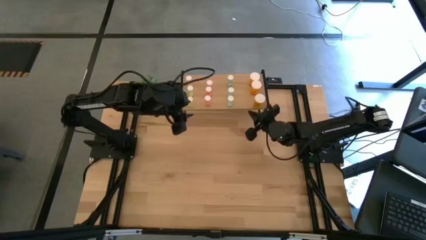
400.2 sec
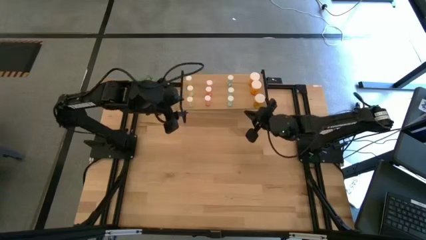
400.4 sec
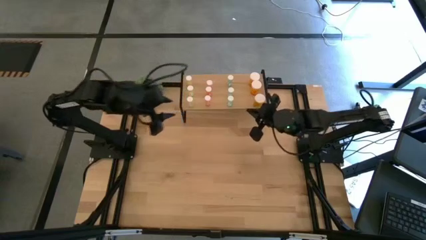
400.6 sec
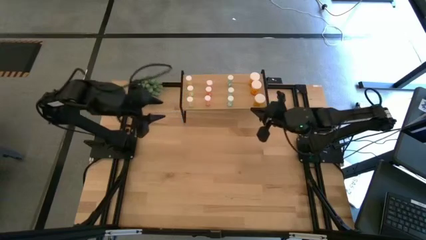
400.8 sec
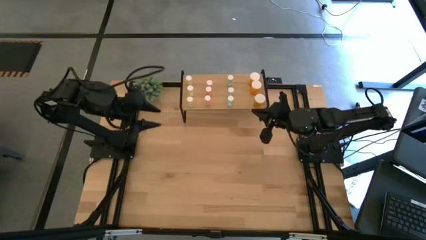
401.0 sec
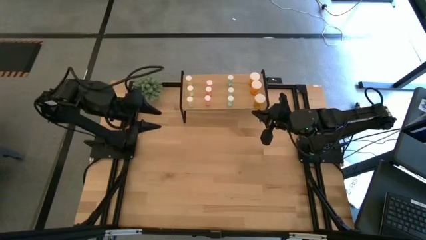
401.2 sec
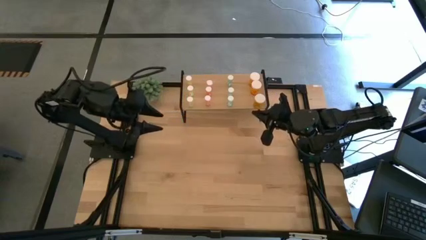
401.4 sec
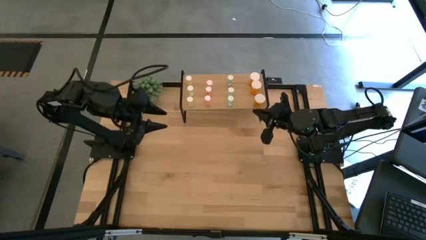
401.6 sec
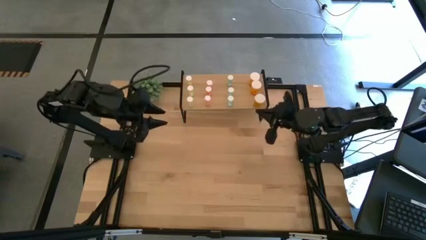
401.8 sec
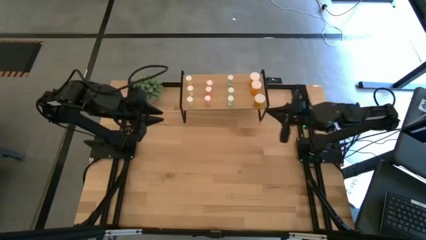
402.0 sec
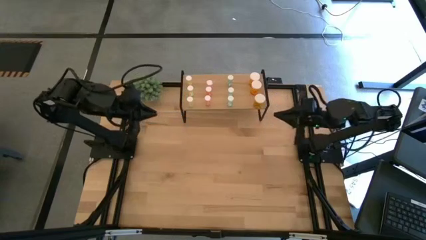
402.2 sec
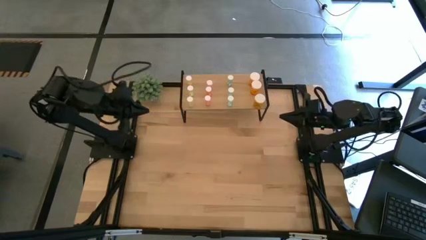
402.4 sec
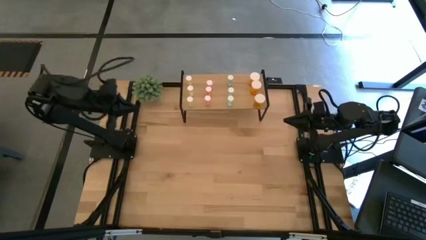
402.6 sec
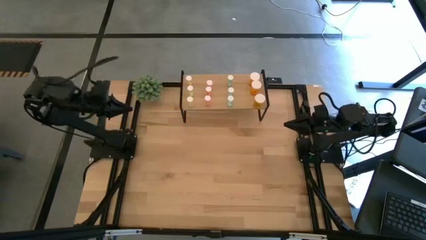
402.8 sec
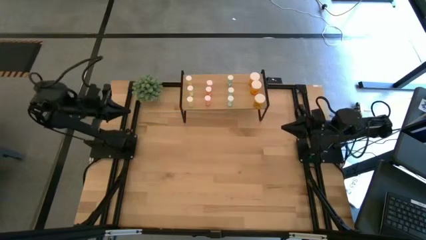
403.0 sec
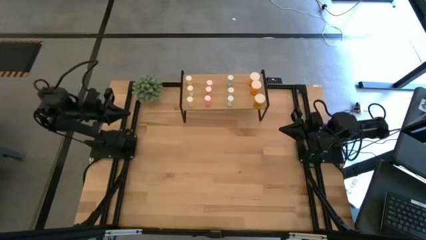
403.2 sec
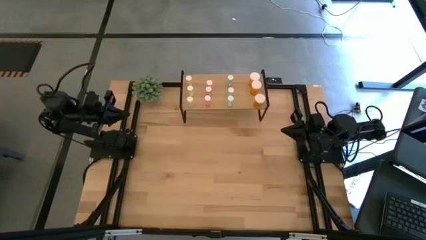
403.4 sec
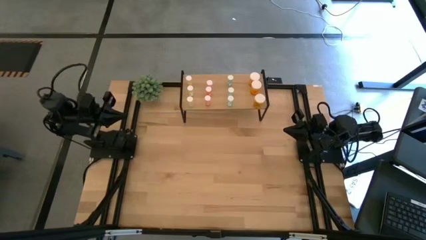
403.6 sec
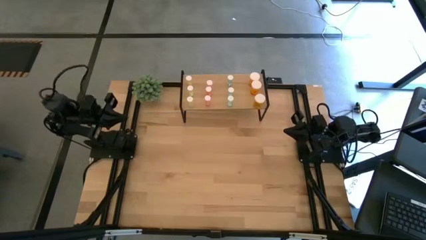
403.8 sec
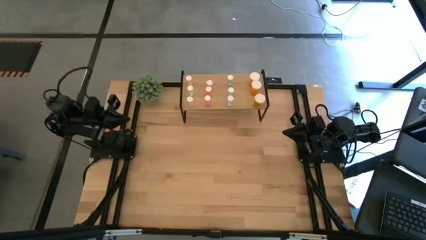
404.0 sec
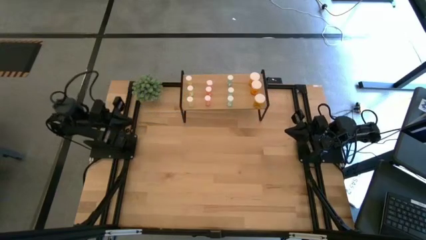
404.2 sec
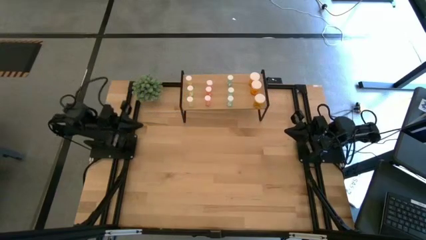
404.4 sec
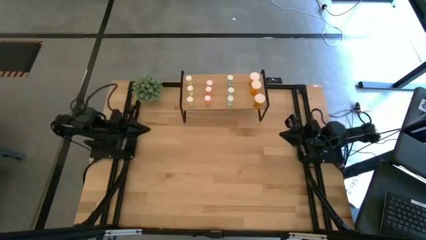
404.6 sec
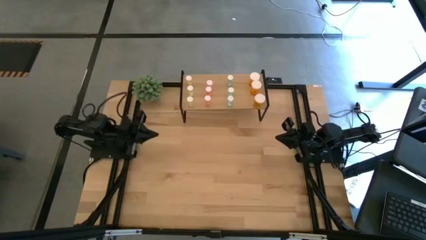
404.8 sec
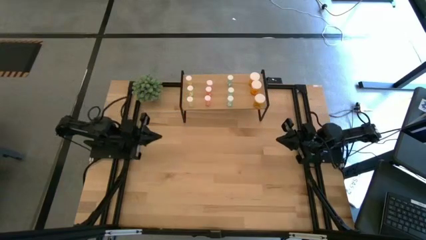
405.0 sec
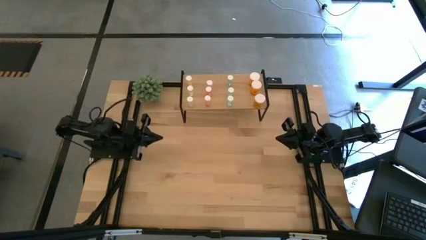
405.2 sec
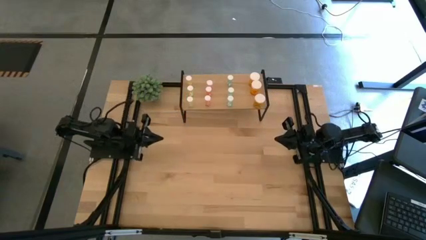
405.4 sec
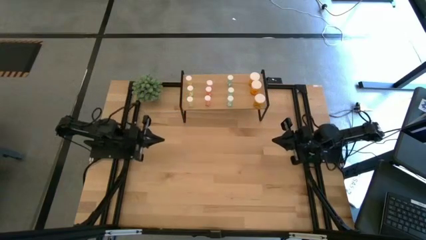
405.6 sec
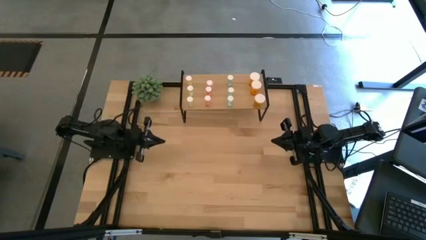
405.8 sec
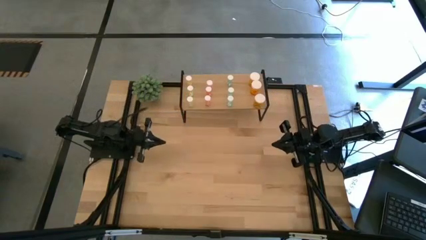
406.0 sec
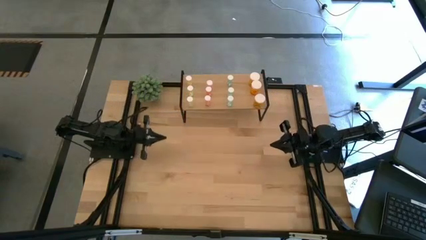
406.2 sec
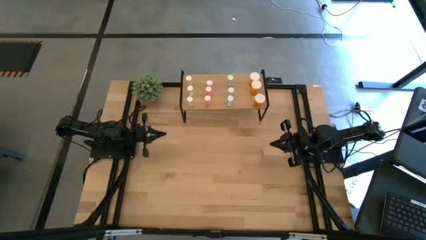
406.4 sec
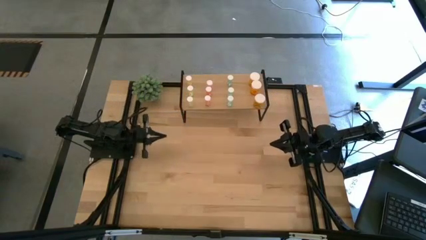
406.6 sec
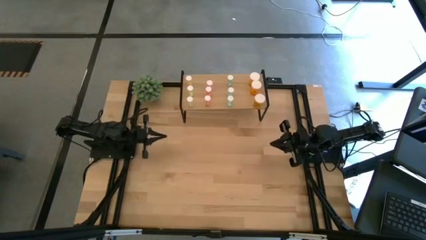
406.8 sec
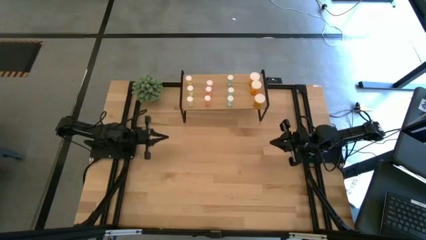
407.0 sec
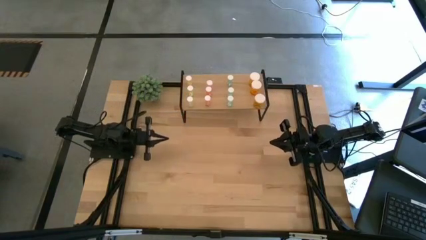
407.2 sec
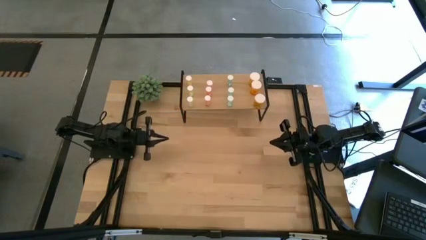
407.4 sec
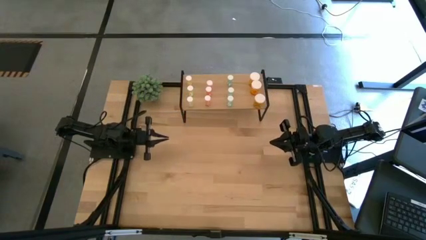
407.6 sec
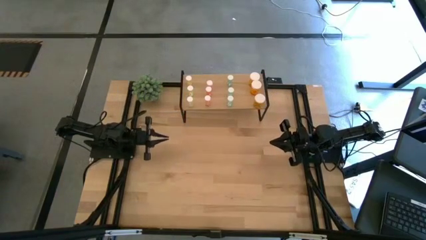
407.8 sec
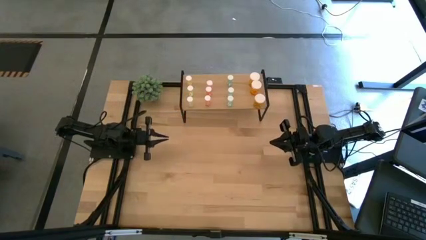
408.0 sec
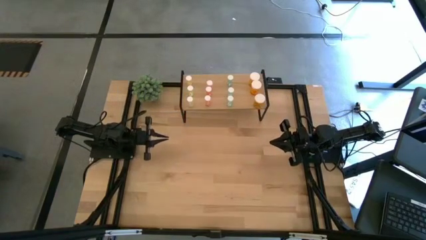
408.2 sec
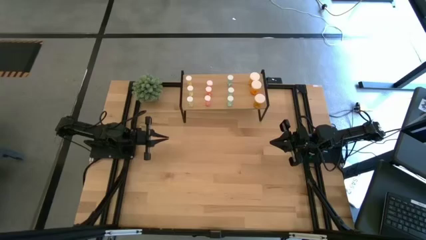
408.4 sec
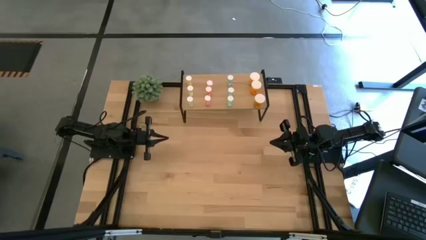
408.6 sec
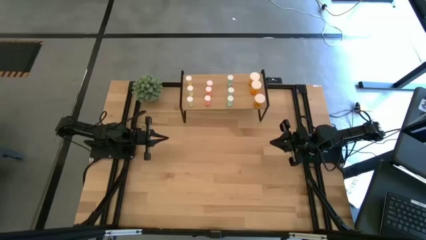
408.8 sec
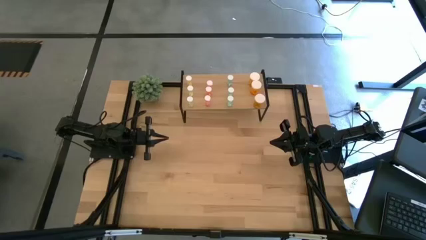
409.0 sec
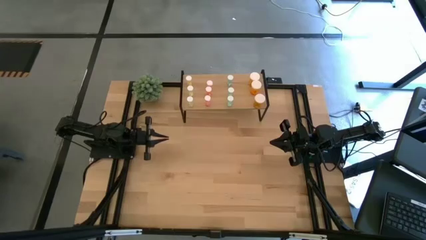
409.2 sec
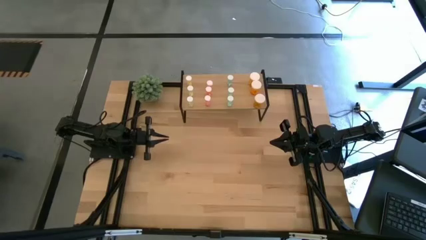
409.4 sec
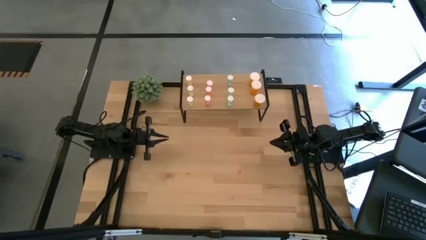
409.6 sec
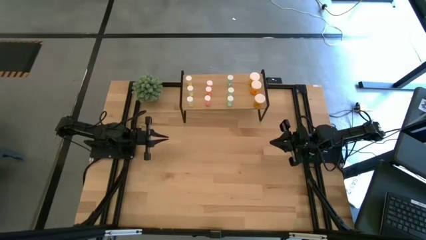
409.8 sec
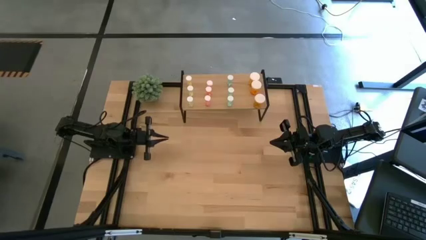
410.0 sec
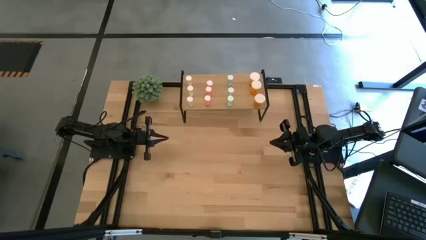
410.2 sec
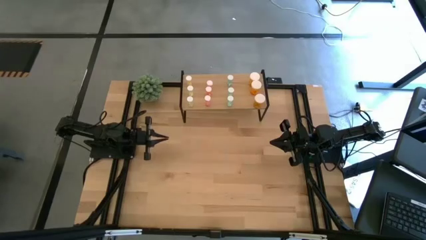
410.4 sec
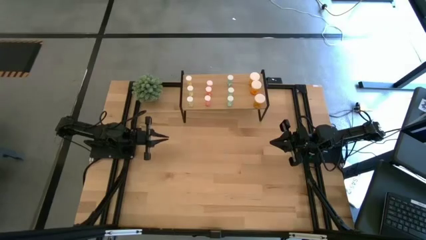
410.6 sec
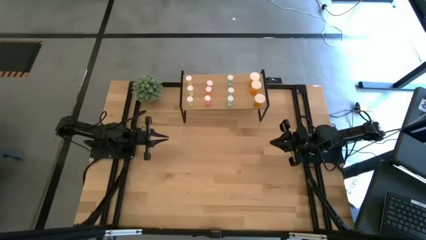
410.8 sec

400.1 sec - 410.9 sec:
Task: Pick and place medicine bottles onto shelf by color
Return to Home Position

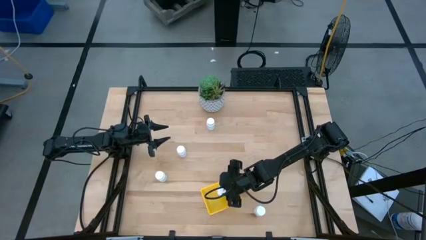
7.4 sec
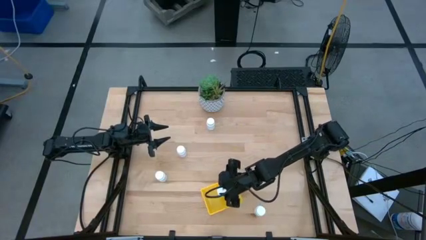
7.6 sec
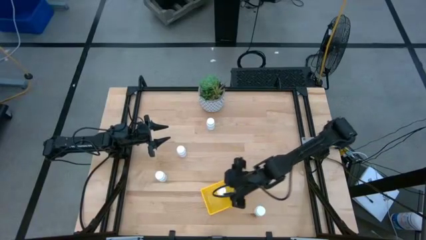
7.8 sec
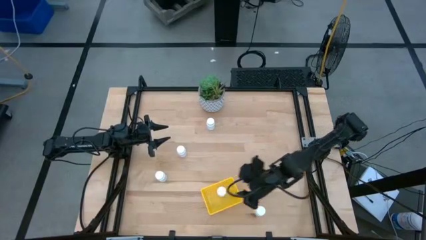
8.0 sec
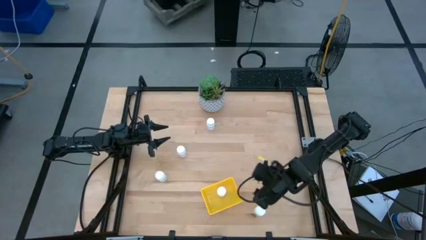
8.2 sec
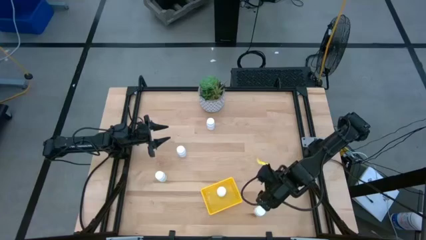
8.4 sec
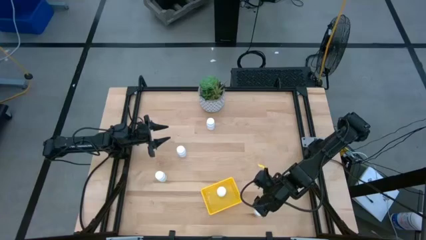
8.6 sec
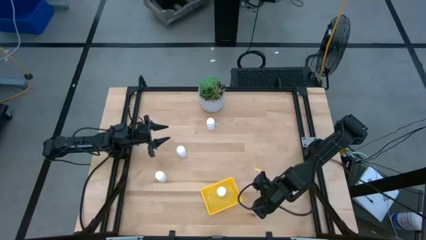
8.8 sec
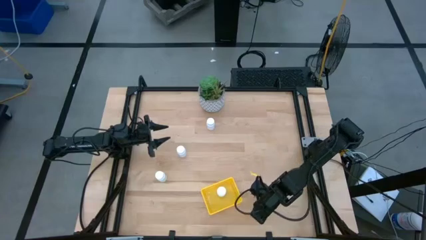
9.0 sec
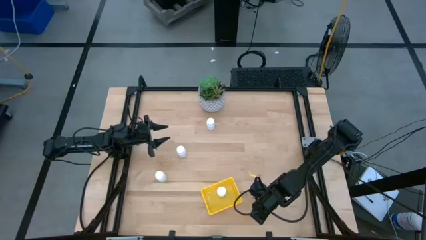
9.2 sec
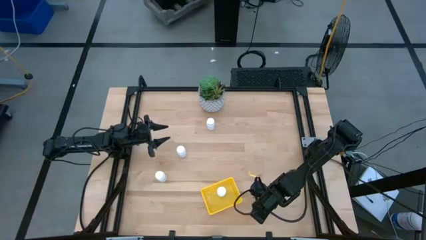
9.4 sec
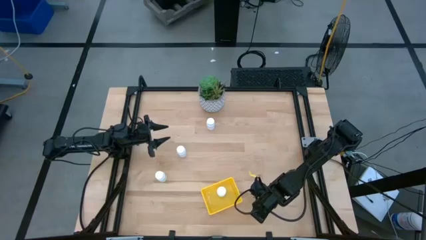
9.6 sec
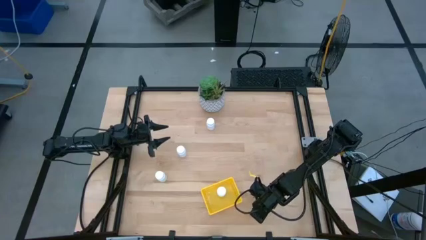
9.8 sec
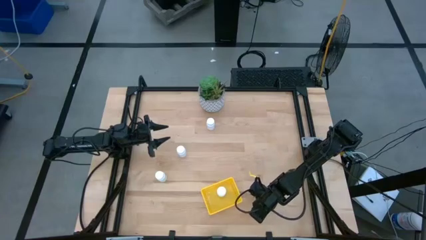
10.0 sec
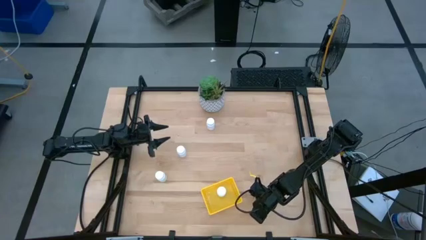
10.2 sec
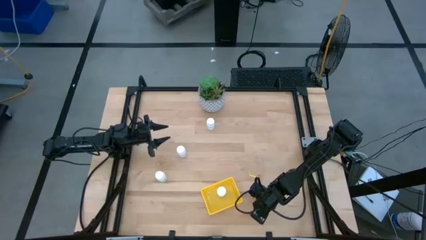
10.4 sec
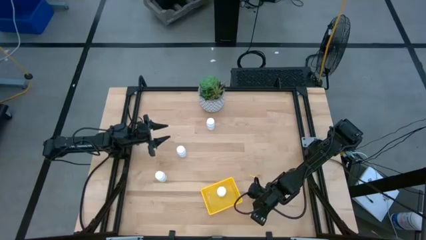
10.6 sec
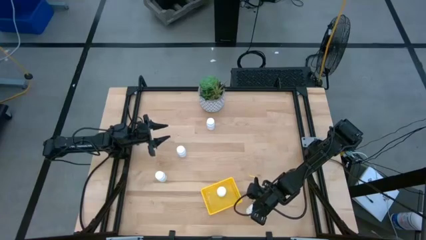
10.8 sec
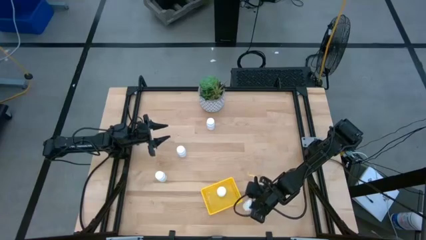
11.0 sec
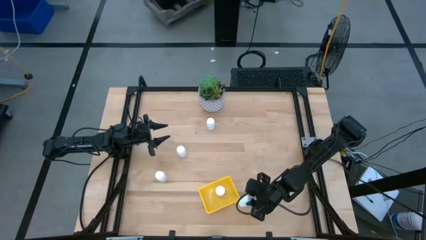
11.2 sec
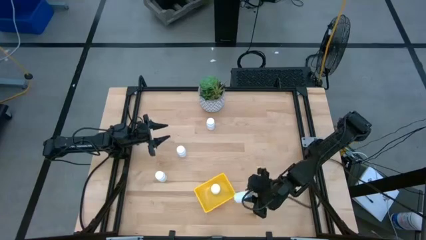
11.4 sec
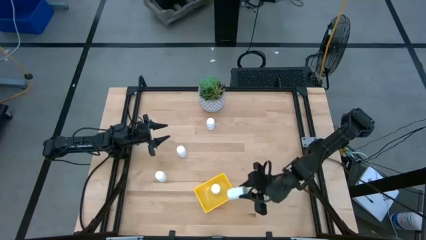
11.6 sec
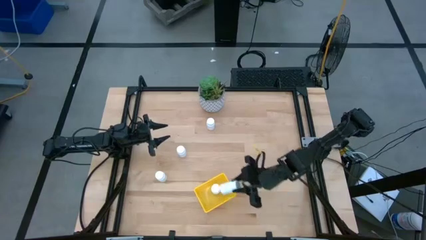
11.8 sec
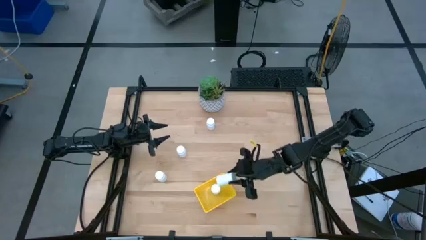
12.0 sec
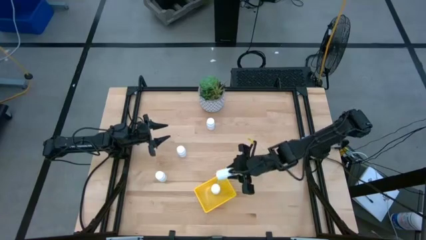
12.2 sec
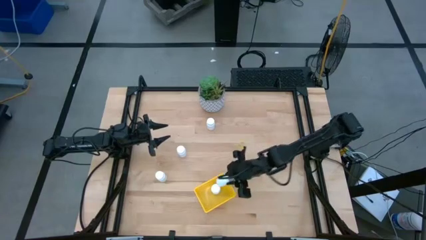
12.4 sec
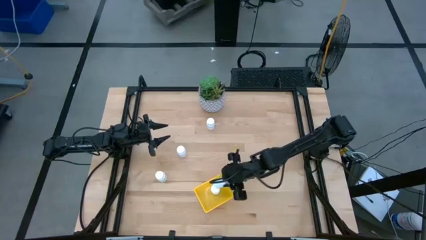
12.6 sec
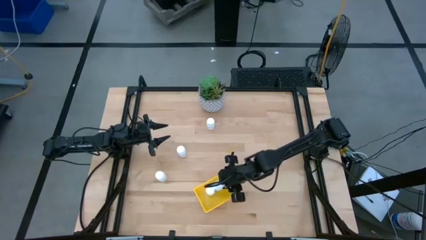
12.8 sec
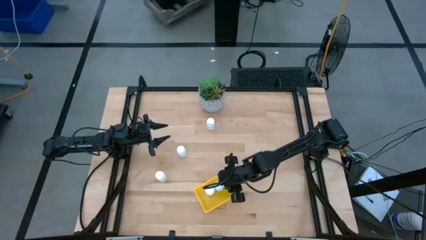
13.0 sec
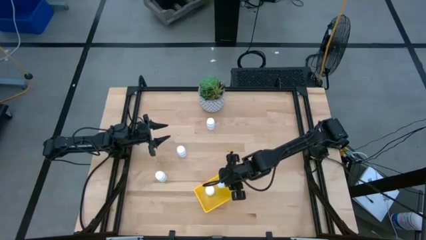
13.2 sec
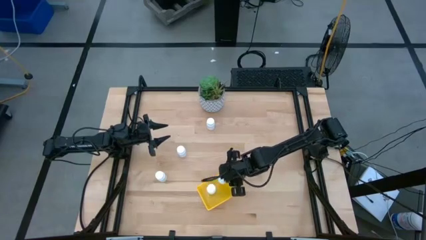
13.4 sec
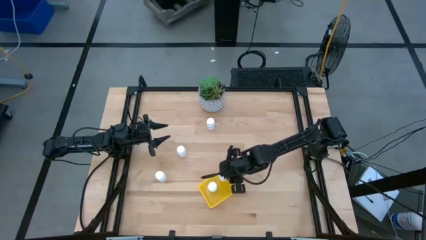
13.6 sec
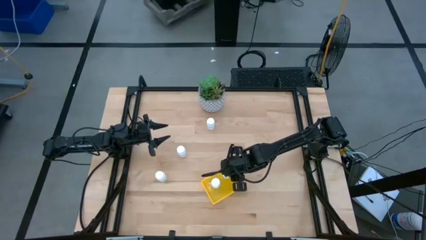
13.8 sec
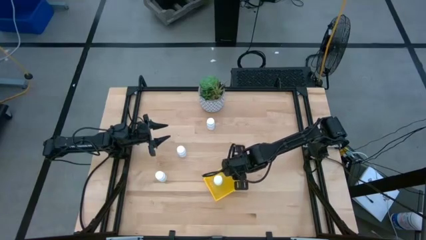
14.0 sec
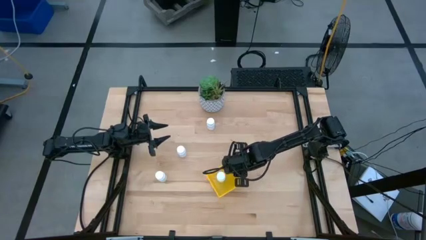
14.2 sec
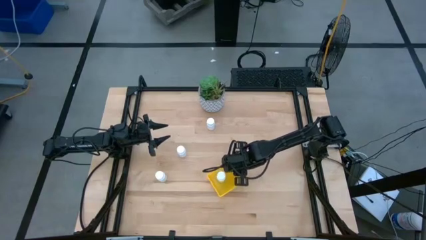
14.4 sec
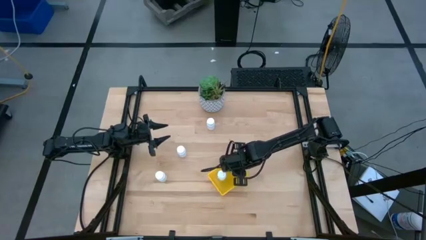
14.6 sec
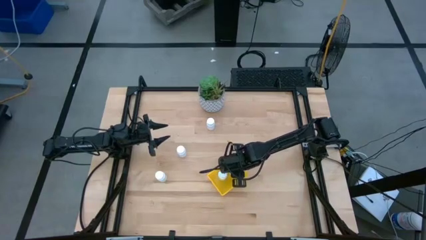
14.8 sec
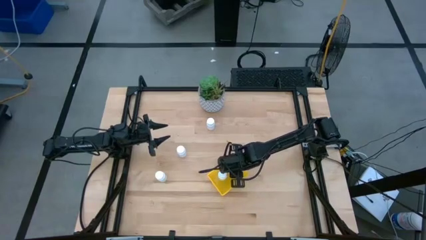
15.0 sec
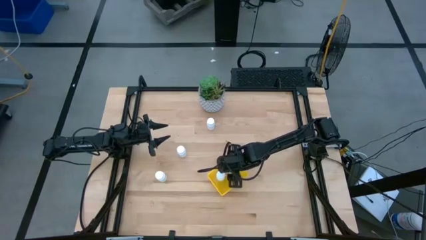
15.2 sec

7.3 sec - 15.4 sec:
Task: Pick and place pill bottles into a basket
Put the white pill bottle into the yellow basket
